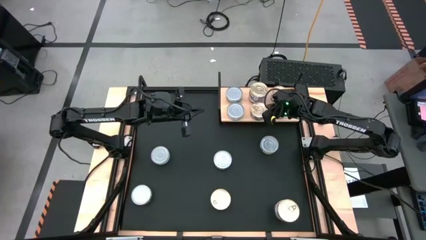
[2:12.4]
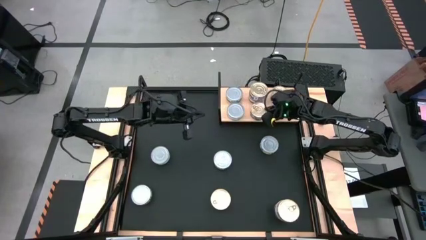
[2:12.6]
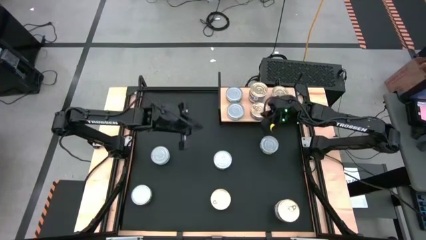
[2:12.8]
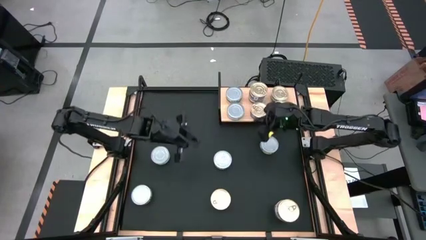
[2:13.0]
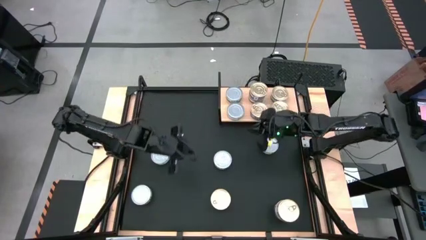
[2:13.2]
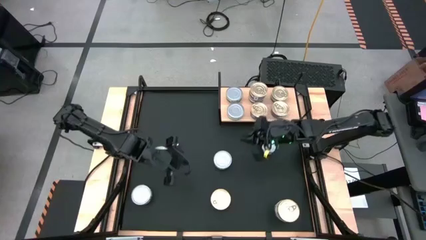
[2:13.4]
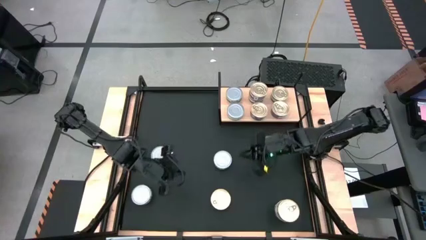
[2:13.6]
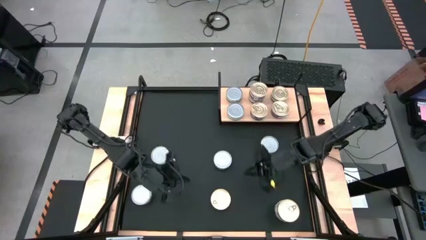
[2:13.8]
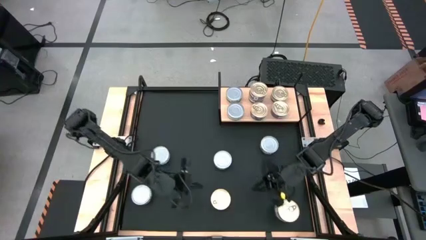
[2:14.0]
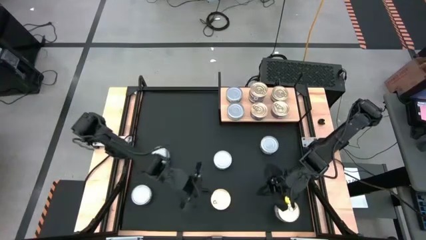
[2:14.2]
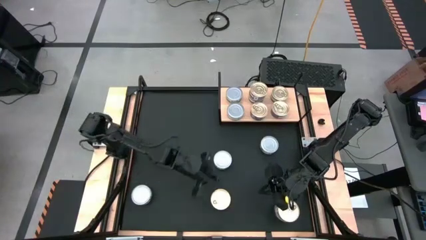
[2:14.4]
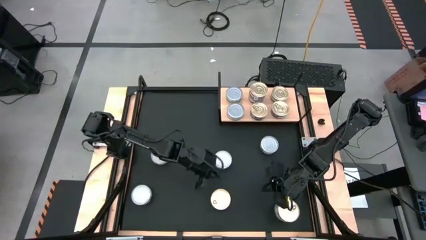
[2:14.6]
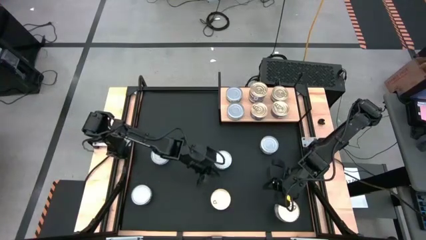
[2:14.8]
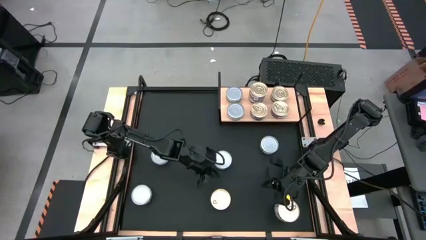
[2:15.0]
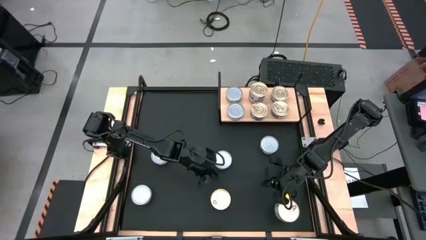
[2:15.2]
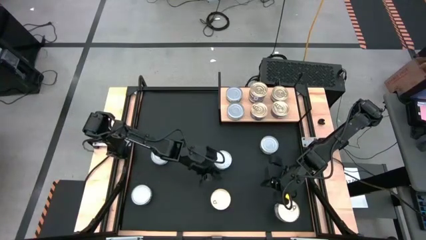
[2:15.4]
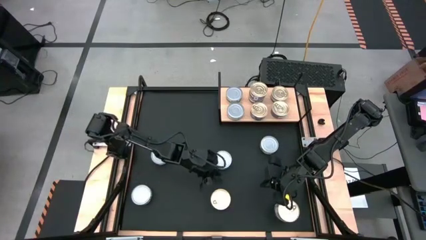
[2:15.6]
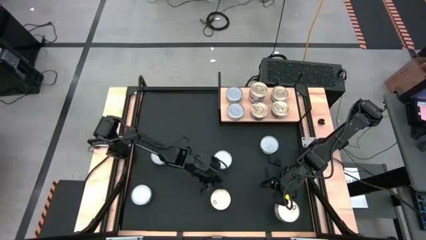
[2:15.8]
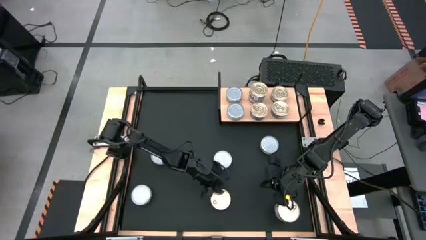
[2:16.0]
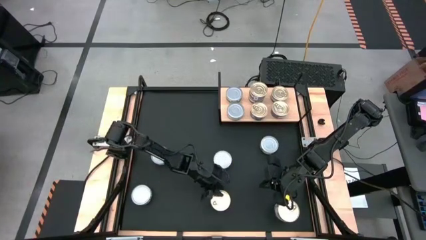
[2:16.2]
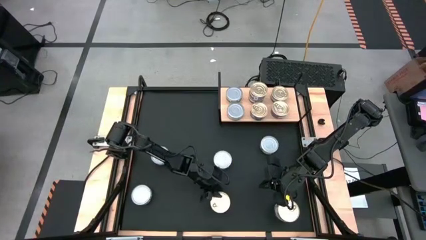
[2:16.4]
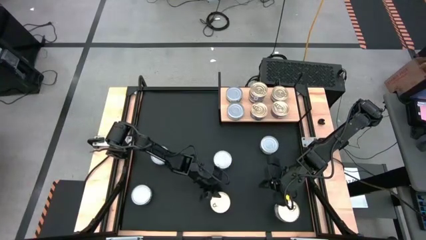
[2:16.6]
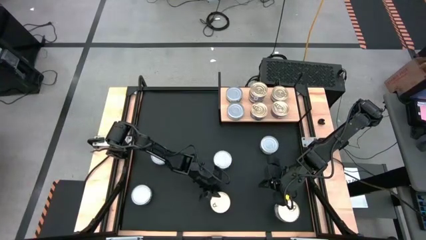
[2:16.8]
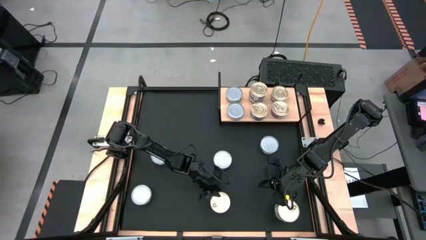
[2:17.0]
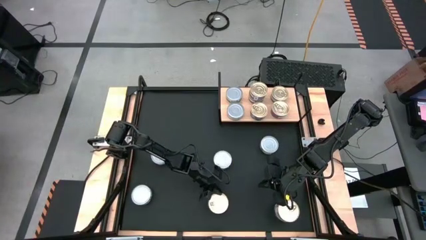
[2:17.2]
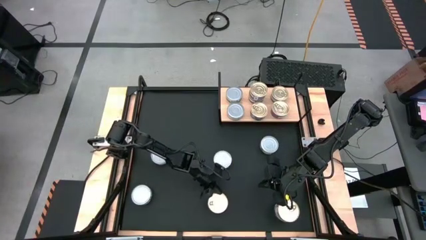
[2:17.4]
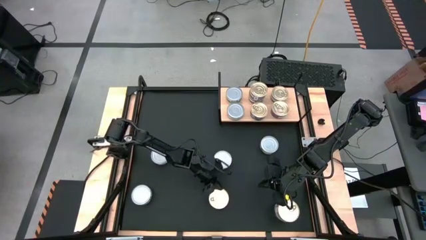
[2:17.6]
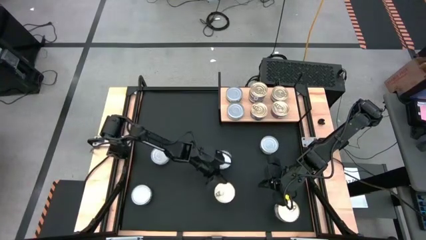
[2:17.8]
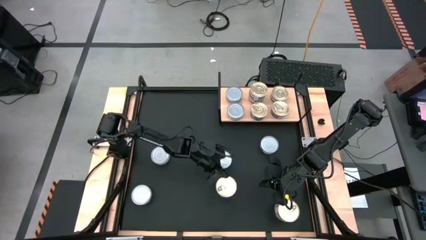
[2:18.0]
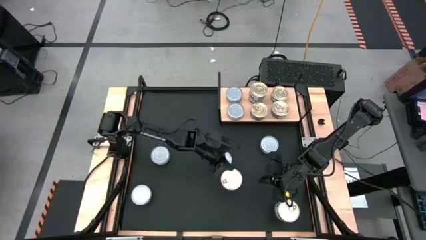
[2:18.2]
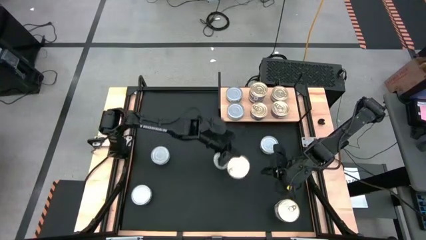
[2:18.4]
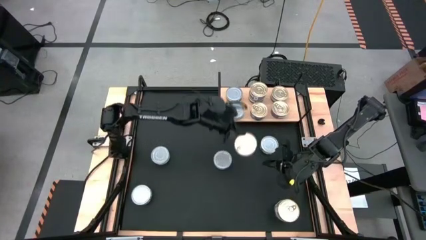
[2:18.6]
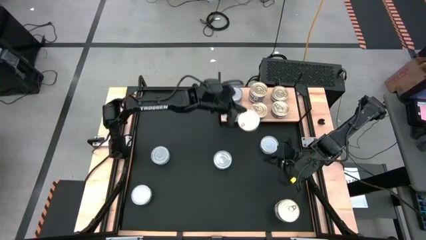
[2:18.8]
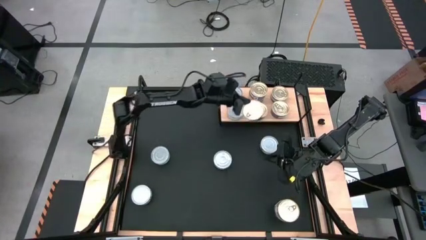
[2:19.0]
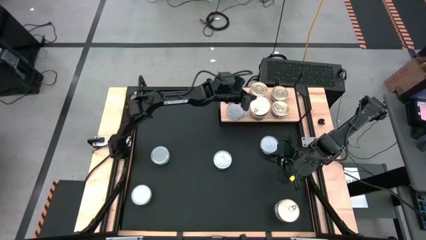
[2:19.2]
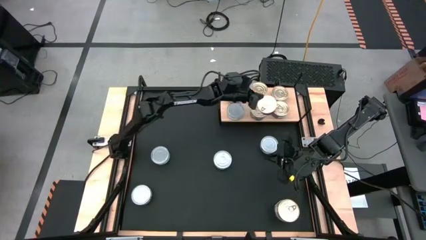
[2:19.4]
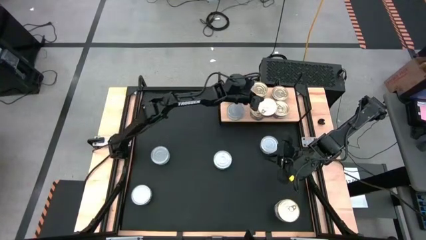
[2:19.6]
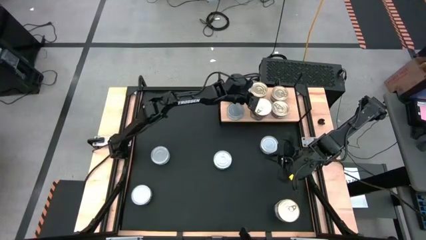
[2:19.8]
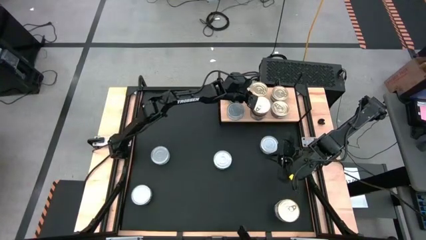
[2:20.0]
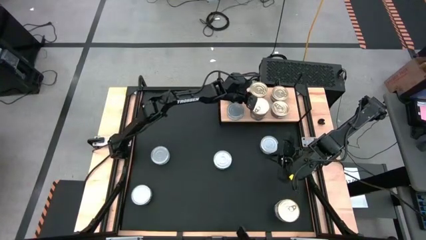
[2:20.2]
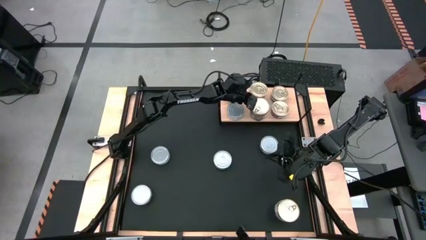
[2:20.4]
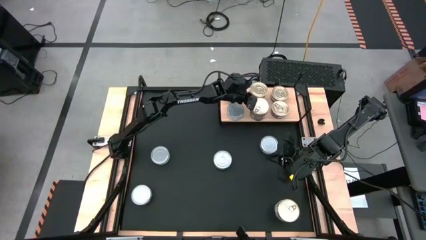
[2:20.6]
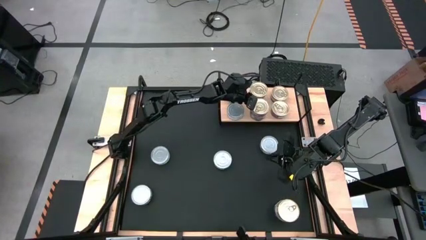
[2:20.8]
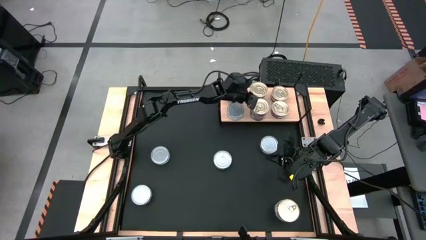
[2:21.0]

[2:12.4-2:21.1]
Task: Stack canned seafood by type on shelf
Stack the blue pink tuna can on top of the other blue pink tuna can on the shelf

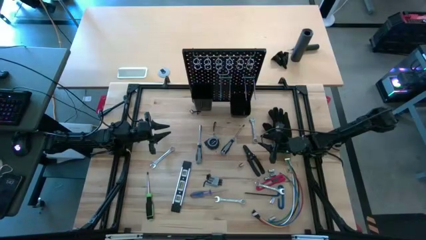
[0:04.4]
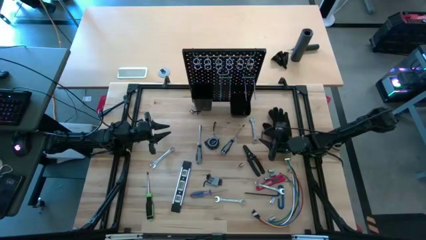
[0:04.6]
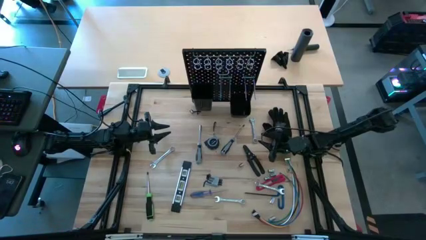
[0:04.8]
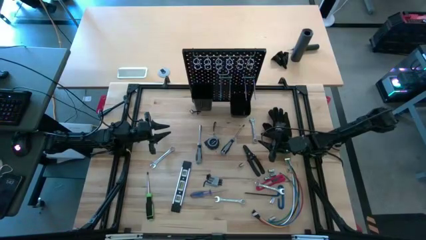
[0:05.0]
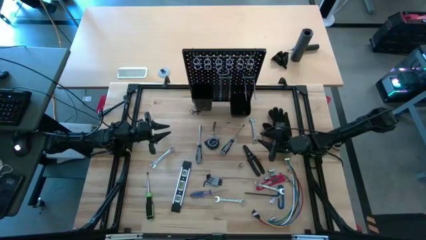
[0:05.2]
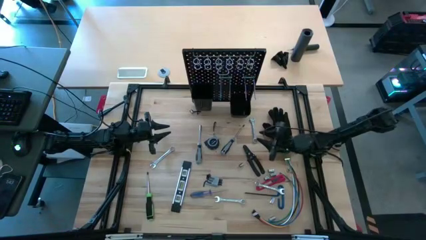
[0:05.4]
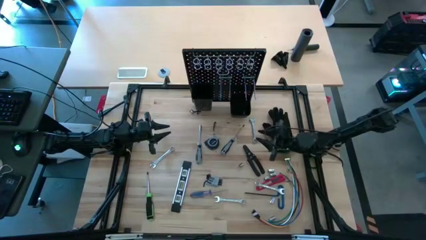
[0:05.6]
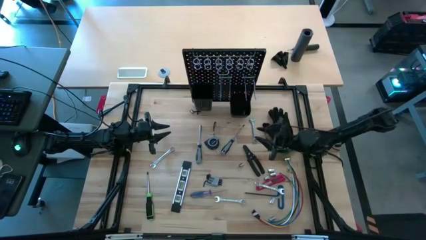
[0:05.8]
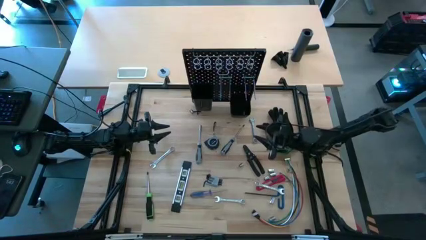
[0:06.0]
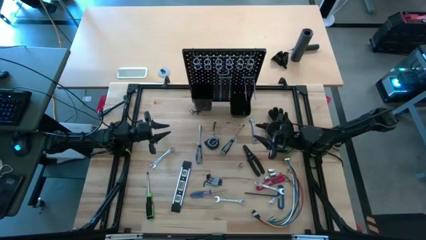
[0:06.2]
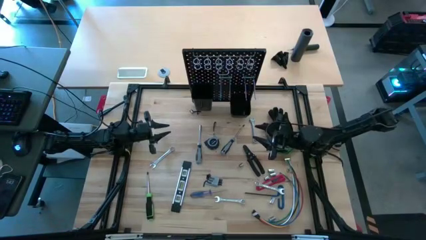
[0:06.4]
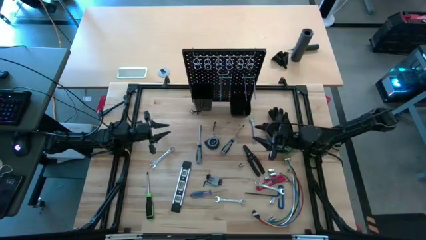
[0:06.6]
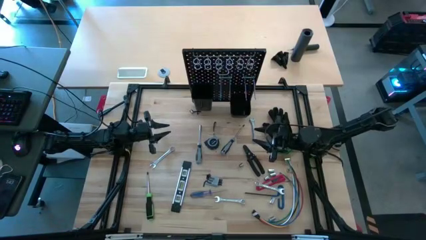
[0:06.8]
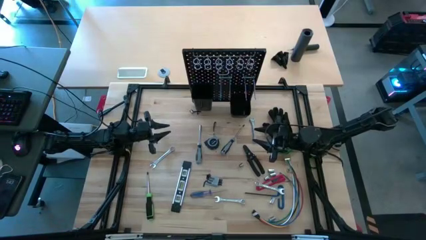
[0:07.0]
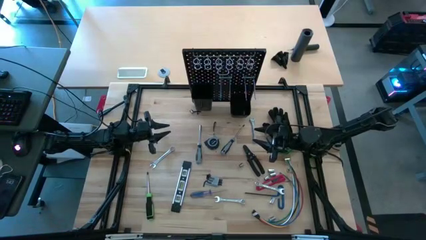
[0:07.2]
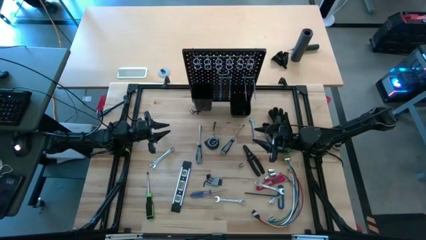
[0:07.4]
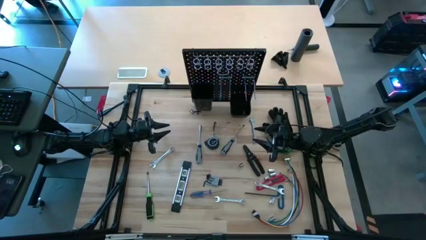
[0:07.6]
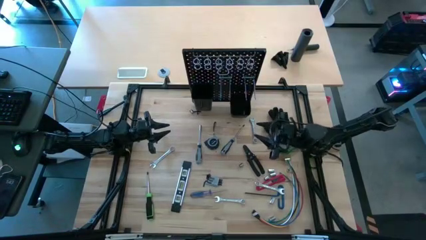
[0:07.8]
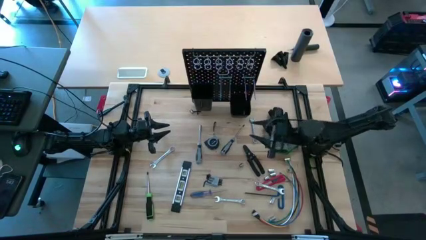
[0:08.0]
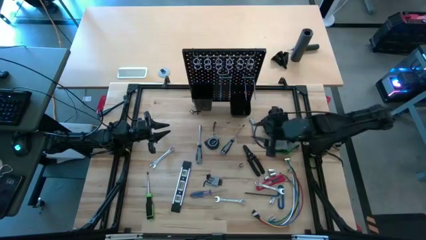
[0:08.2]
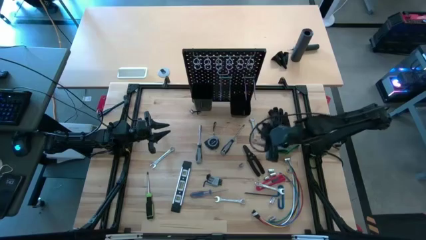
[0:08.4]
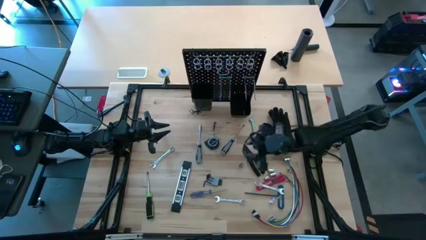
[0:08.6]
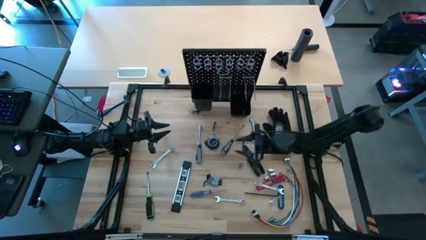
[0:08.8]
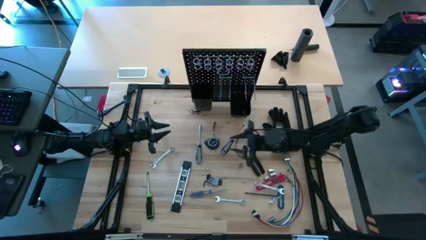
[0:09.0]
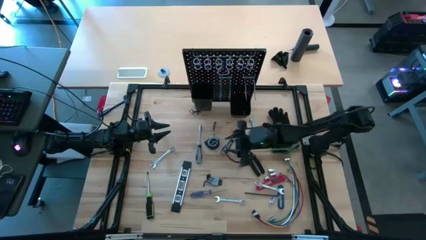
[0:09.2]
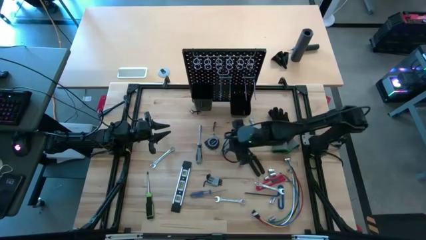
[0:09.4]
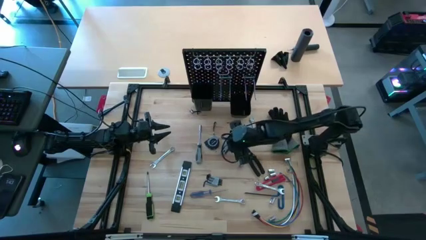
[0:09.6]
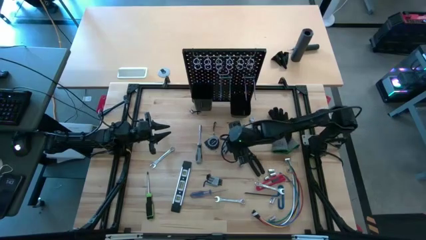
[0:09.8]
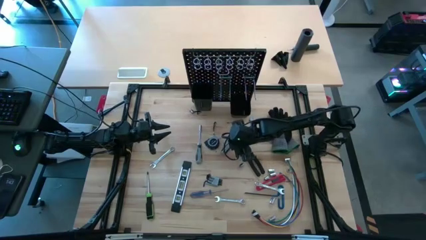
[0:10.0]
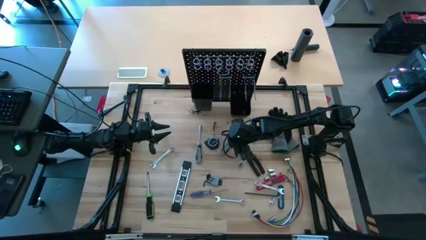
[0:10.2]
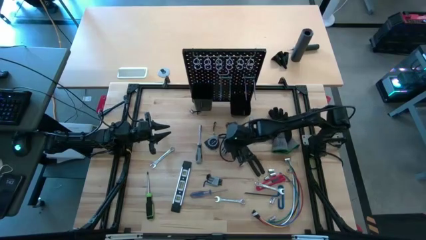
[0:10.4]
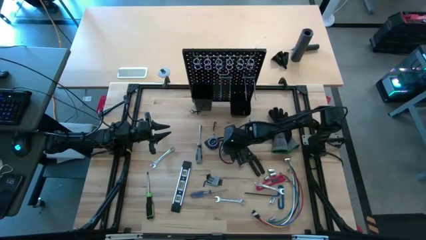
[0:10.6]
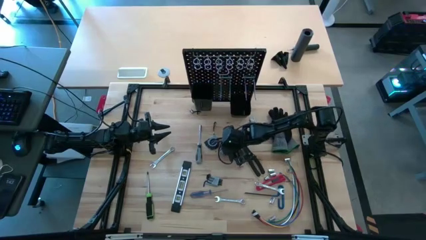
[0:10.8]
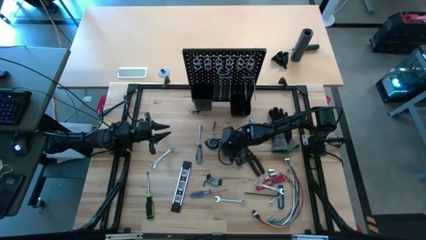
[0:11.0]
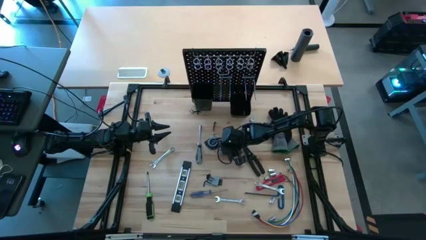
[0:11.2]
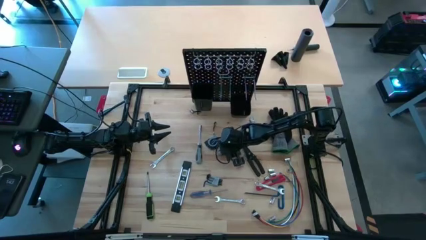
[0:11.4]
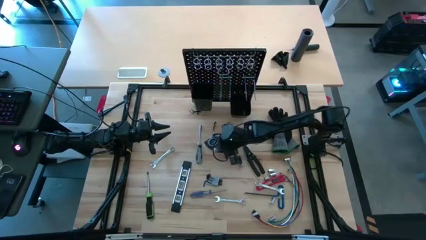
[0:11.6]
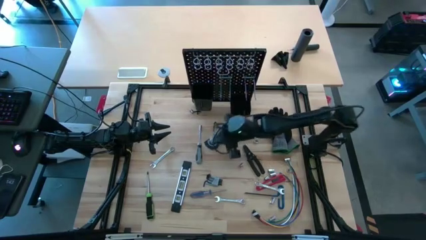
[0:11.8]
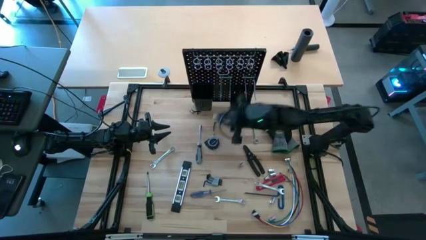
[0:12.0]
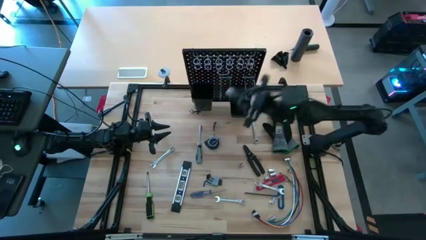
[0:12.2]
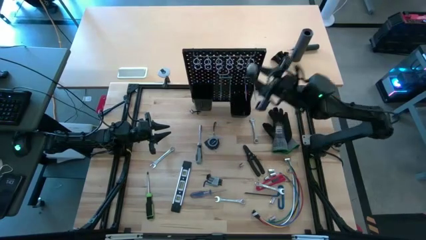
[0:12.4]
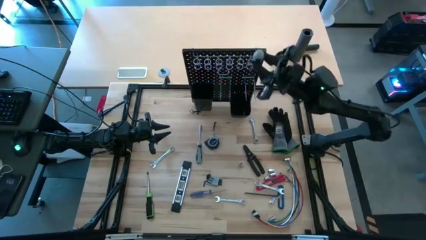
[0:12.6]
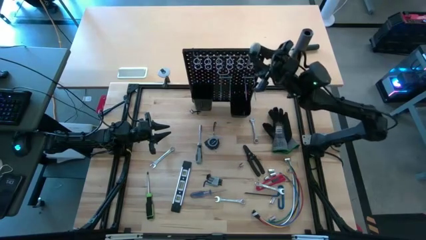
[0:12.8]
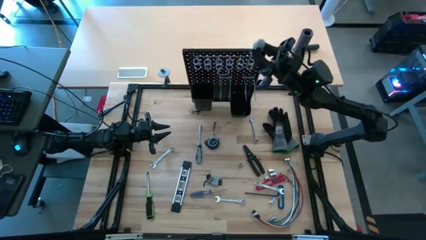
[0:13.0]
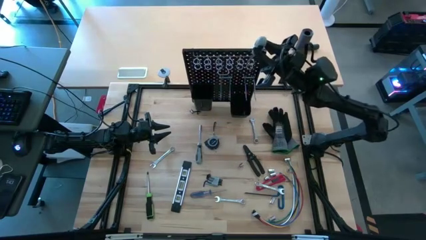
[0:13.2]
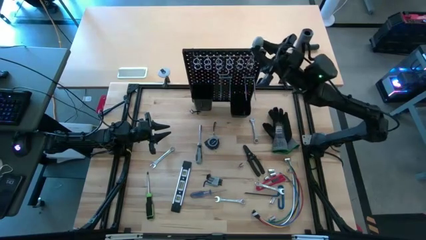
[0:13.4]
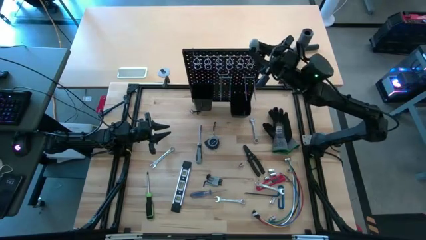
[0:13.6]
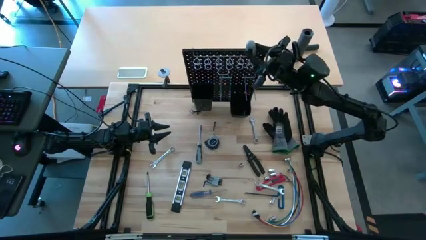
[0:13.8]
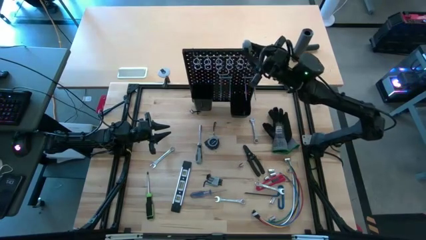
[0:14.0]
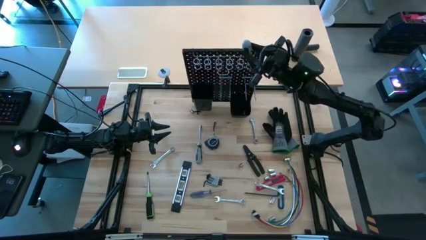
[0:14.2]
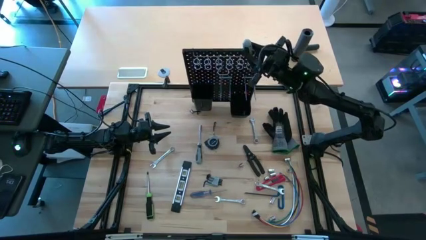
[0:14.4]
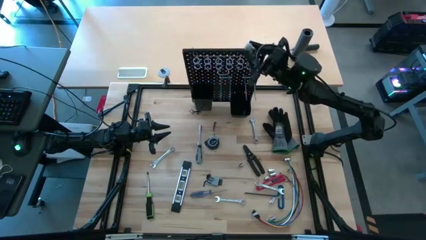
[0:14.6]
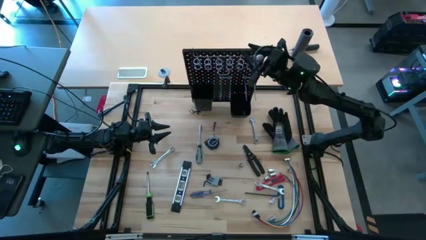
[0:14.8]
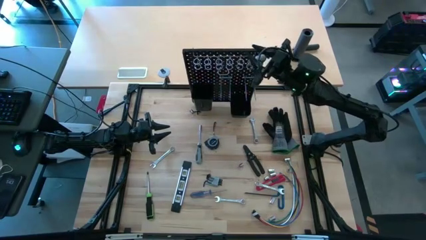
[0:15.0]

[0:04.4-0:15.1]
Task: Hang tools onto peg board
Hang the right gray screwdriver on the peg board
